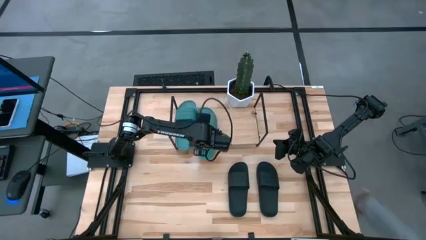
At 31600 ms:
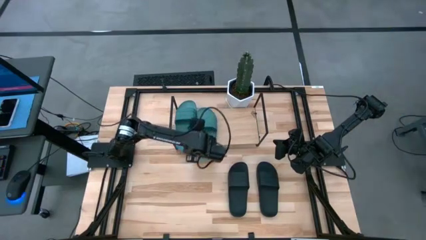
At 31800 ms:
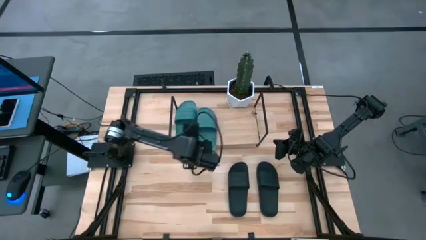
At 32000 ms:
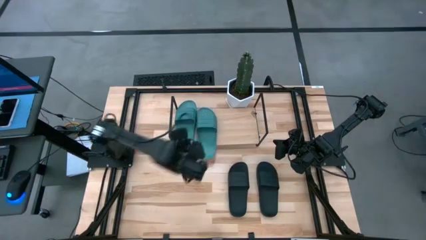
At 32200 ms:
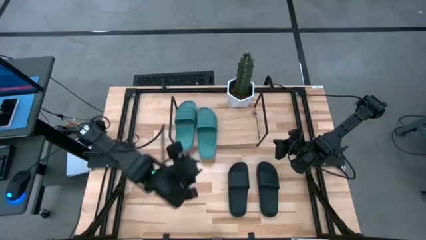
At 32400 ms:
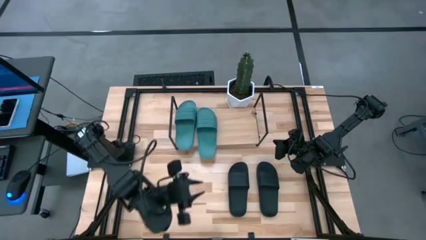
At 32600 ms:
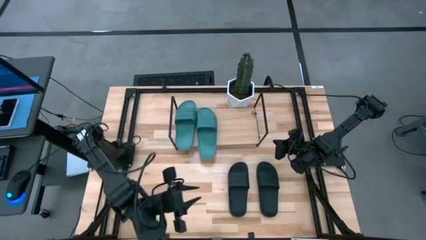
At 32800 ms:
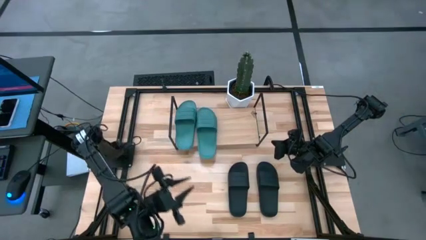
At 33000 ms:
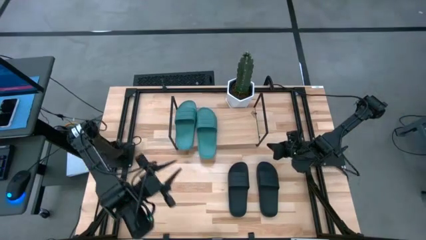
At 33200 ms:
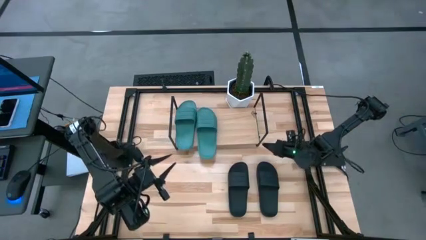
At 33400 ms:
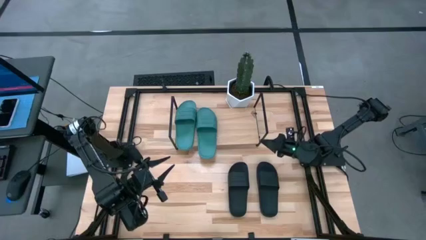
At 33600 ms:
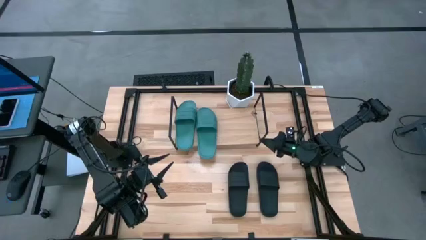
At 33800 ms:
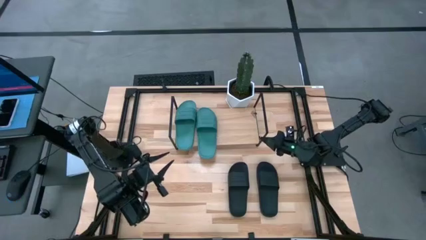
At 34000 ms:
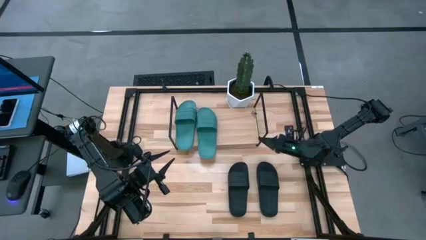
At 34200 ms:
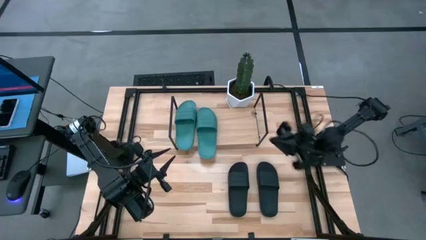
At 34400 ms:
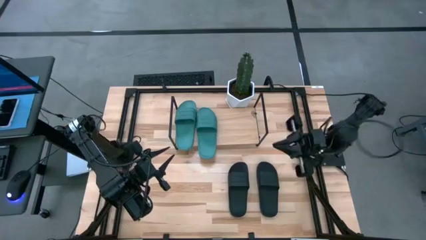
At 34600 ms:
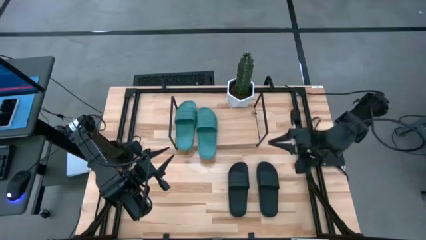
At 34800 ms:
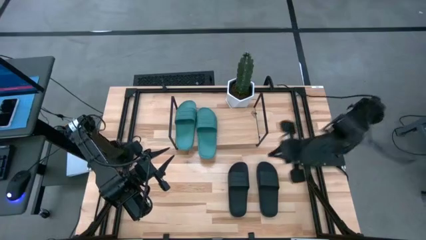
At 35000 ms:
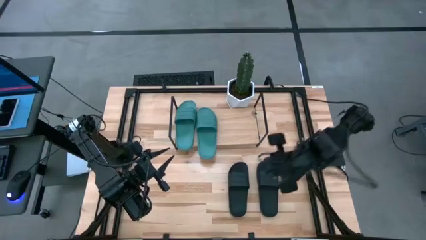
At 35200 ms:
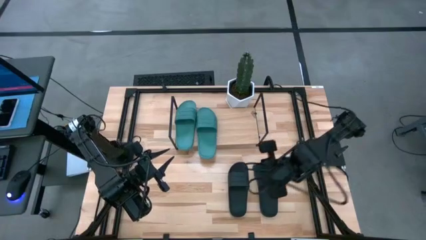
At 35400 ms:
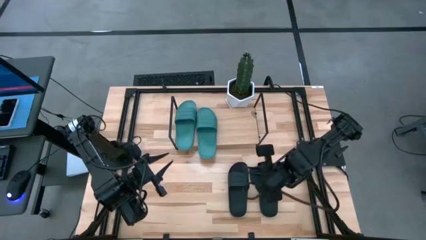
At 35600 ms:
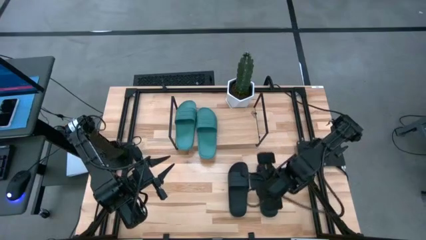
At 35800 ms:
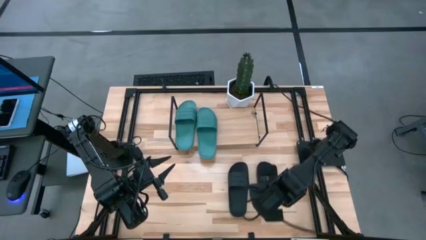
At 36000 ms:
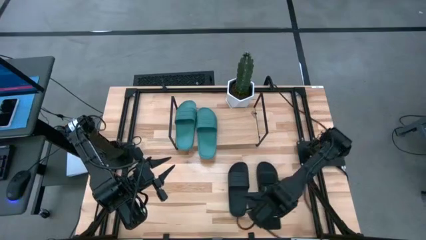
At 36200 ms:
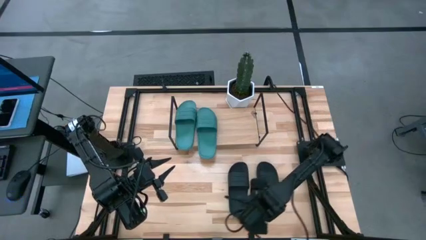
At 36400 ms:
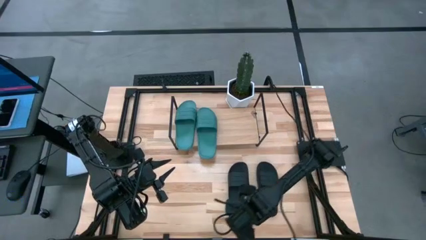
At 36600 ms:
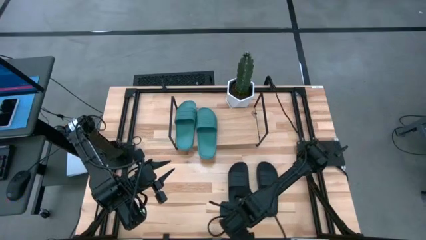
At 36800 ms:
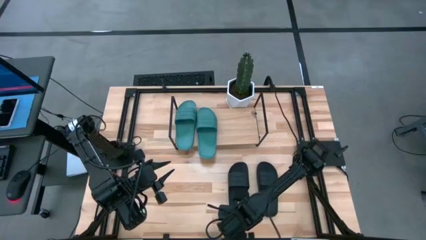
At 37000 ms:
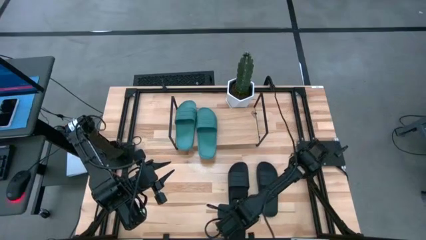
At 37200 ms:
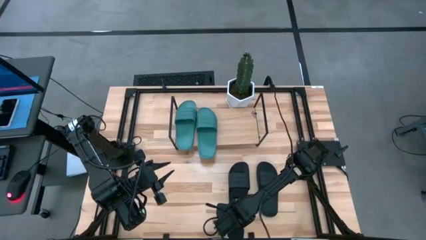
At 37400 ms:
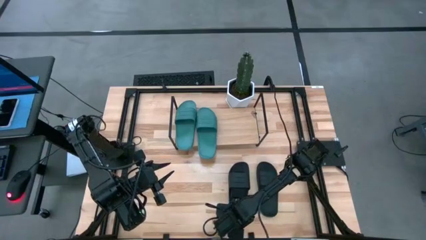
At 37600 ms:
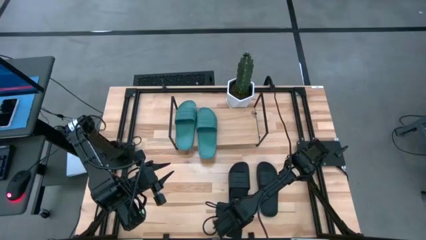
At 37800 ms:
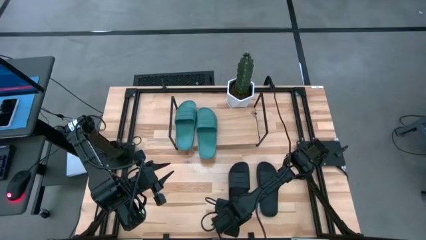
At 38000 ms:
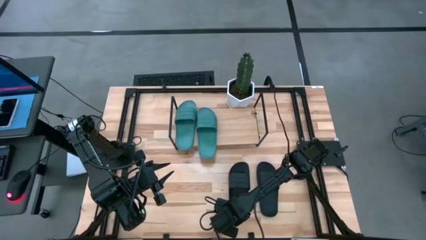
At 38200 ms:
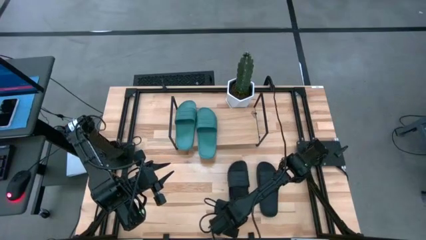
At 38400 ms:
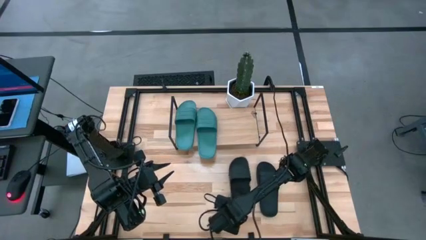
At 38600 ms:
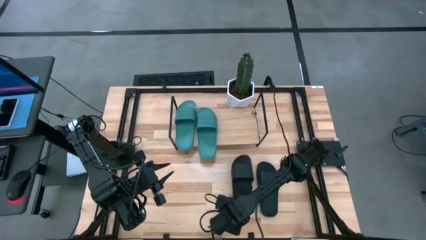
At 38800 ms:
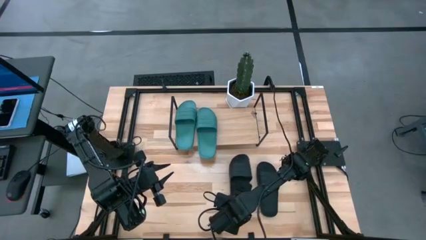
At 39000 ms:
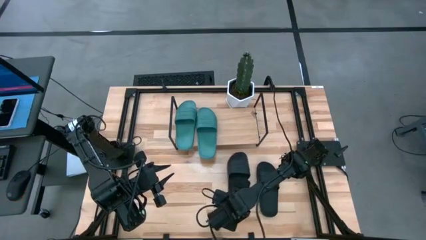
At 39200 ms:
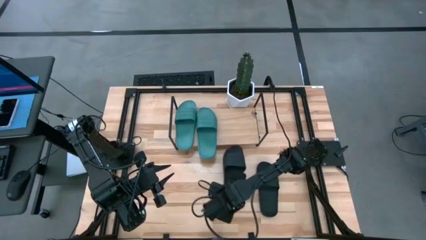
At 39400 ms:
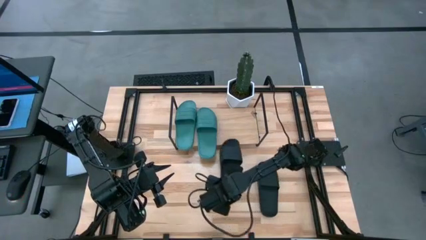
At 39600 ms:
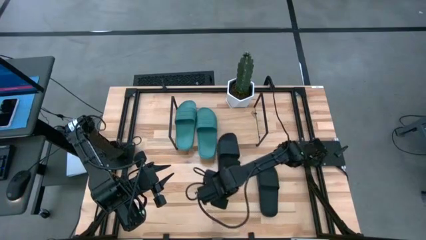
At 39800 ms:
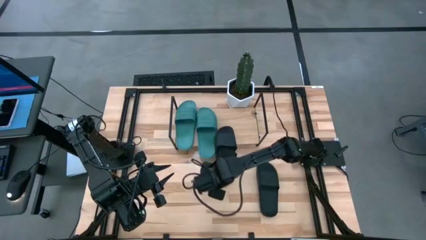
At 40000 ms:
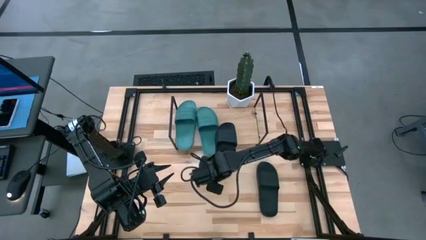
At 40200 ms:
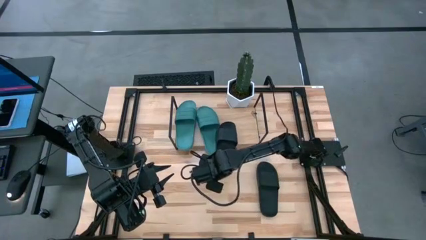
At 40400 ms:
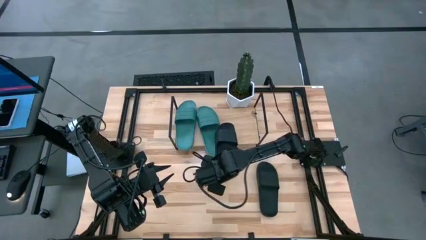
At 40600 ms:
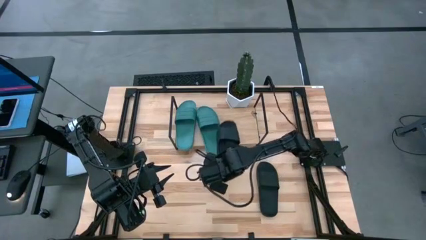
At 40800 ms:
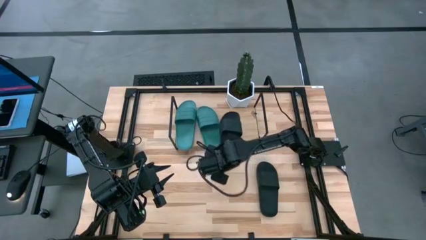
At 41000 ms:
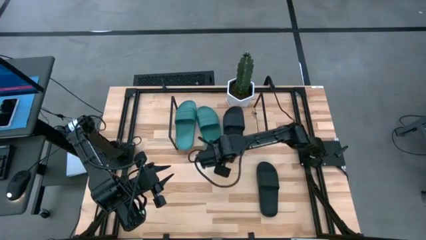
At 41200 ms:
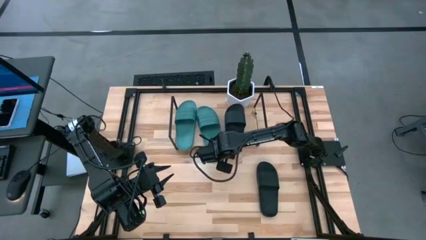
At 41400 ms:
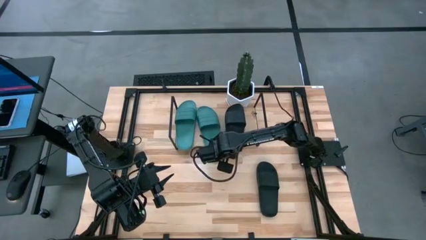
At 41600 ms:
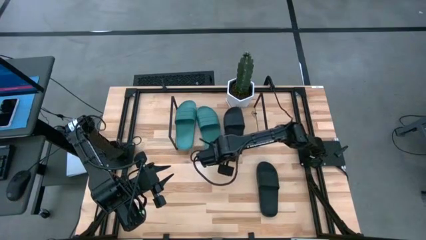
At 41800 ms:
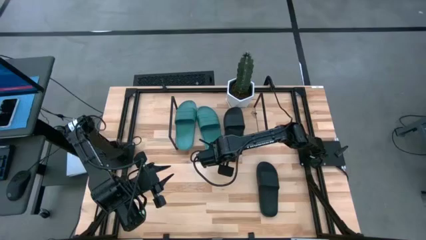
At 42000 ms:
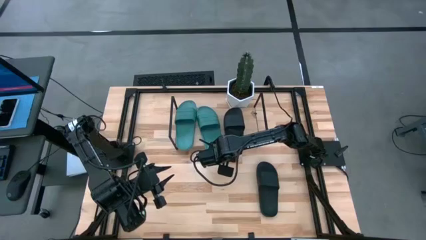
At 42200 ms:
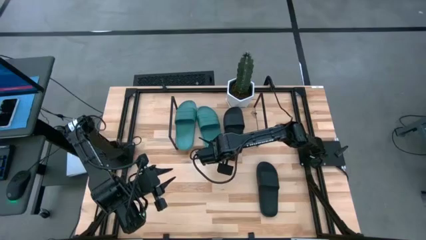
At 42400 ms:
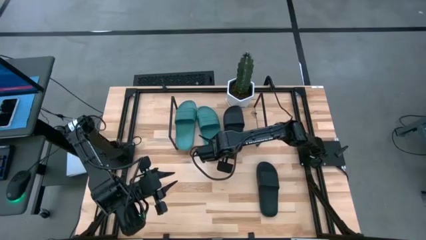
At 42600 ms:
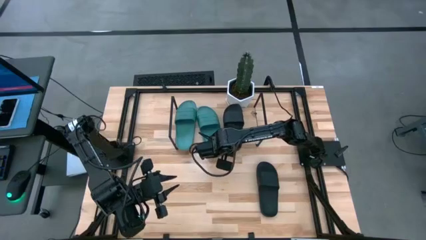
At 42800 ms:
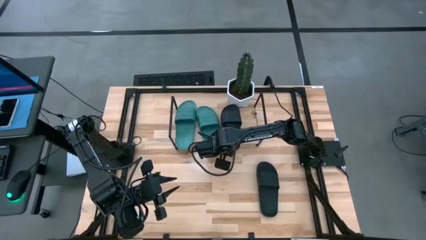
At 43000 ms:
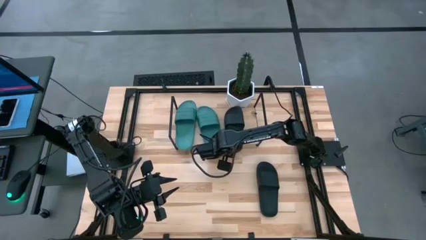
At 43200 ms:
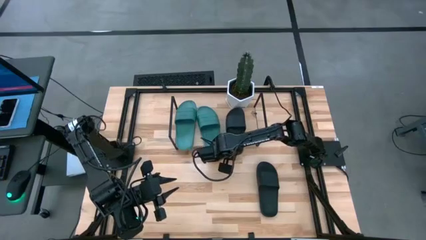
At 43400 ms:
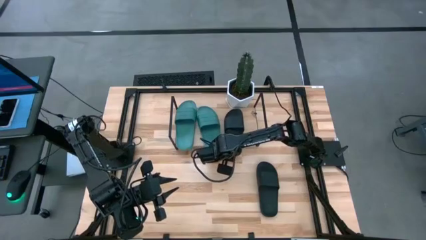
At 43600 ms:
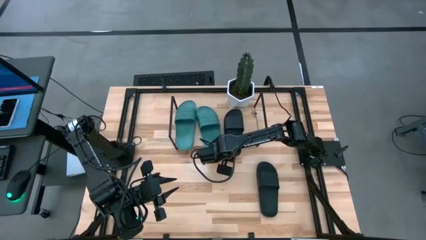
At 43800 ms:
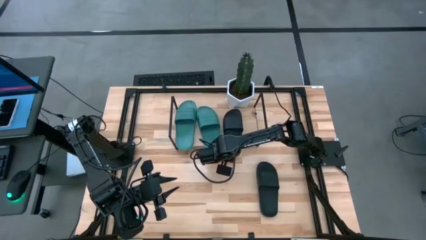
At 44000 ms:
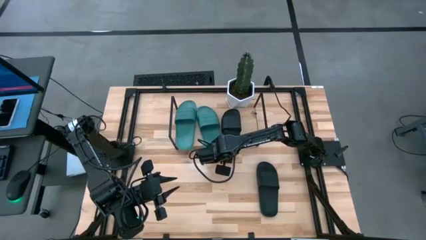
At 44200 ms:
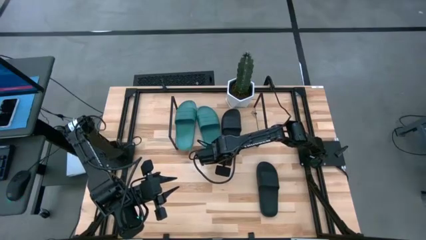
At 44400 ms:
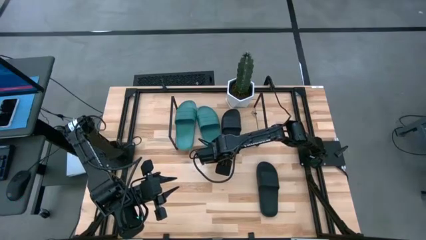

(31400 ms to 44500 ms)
Task: Pick and place slides into the shelf
Put the left black slipper on the shelf
